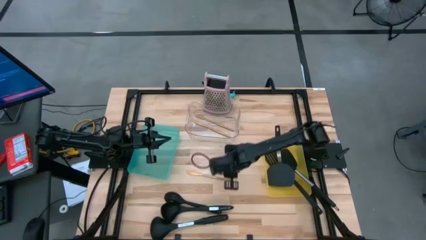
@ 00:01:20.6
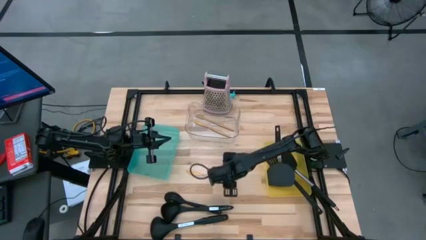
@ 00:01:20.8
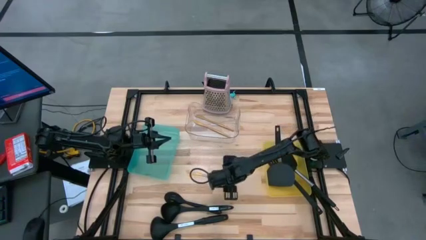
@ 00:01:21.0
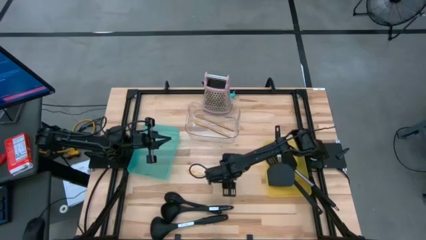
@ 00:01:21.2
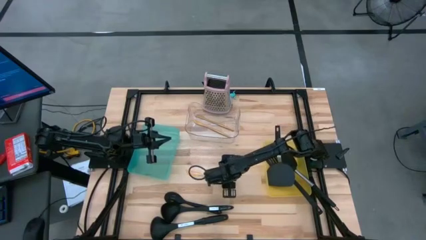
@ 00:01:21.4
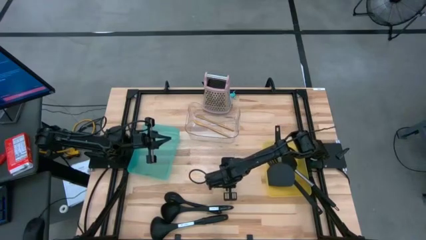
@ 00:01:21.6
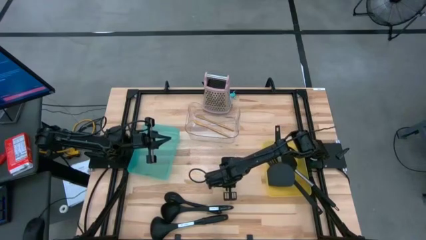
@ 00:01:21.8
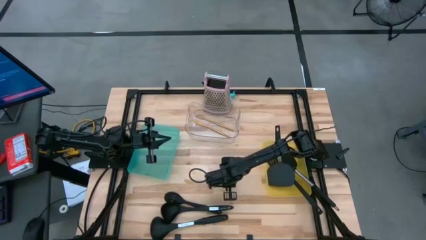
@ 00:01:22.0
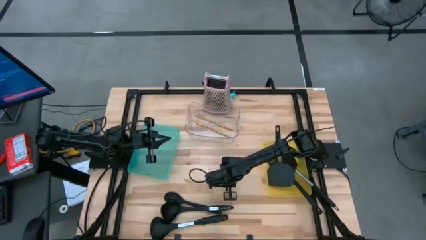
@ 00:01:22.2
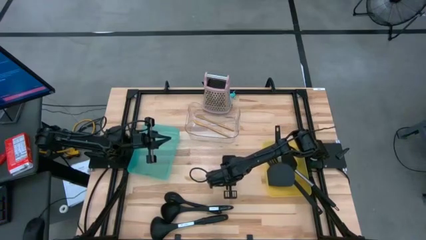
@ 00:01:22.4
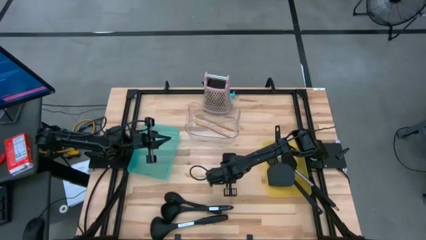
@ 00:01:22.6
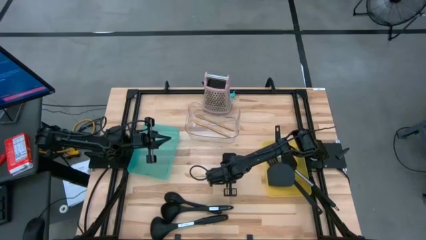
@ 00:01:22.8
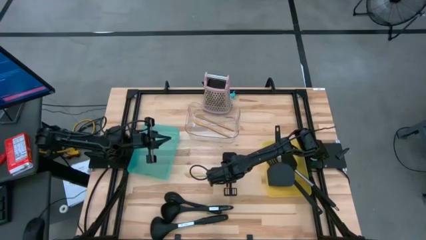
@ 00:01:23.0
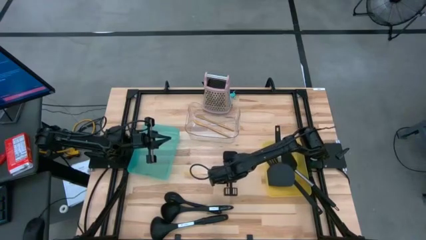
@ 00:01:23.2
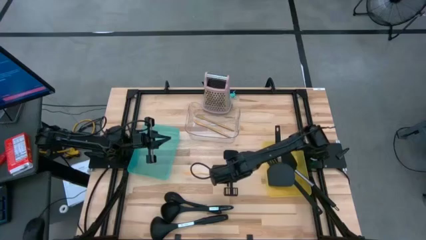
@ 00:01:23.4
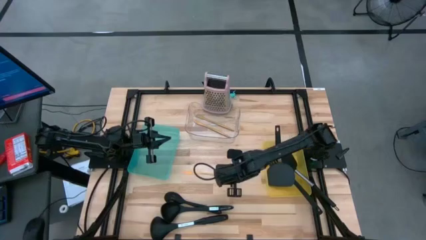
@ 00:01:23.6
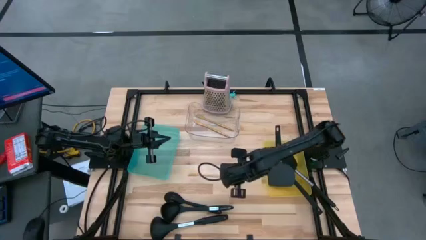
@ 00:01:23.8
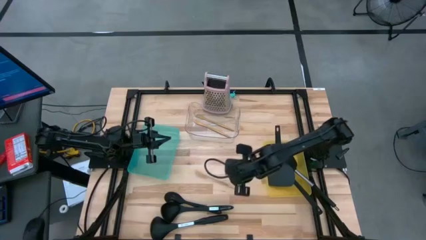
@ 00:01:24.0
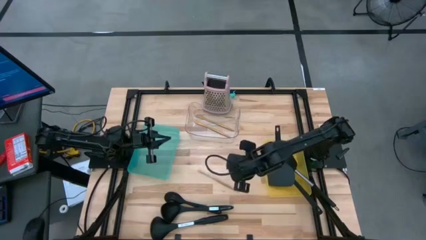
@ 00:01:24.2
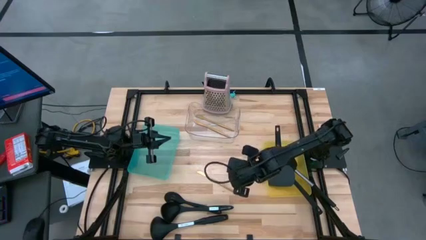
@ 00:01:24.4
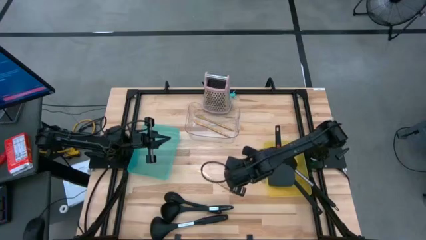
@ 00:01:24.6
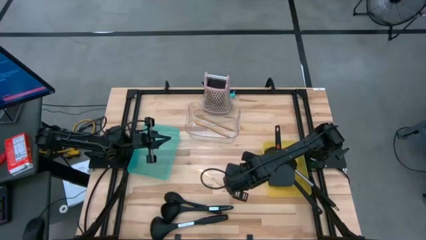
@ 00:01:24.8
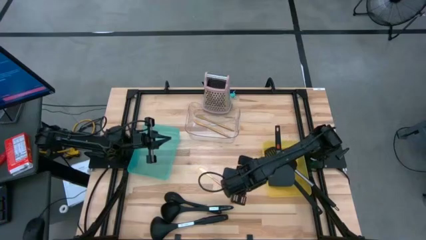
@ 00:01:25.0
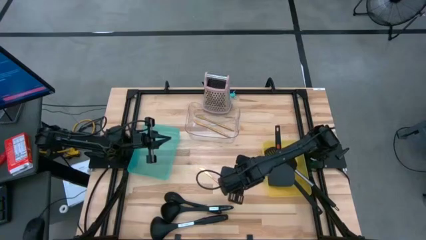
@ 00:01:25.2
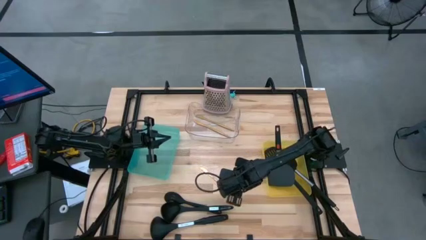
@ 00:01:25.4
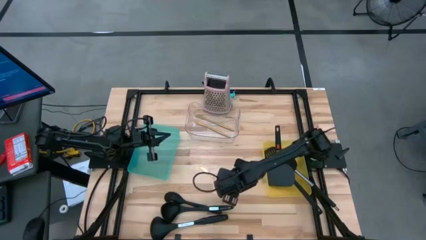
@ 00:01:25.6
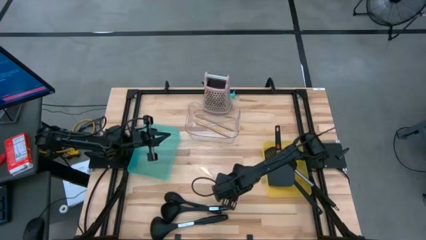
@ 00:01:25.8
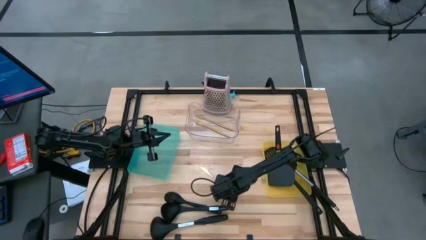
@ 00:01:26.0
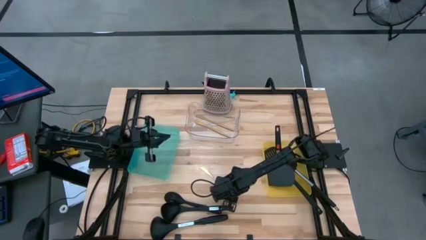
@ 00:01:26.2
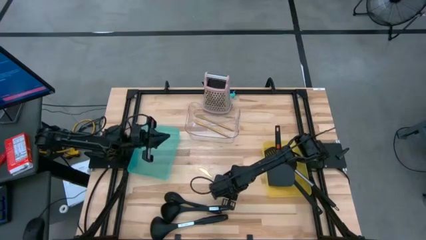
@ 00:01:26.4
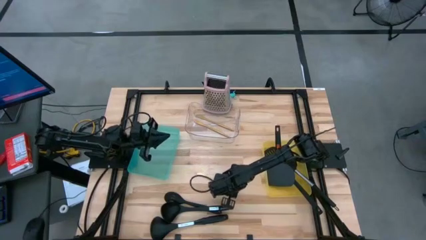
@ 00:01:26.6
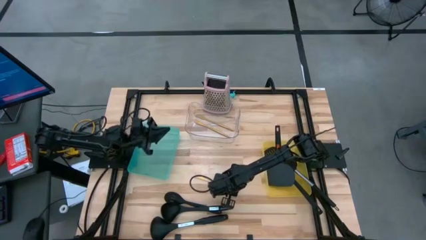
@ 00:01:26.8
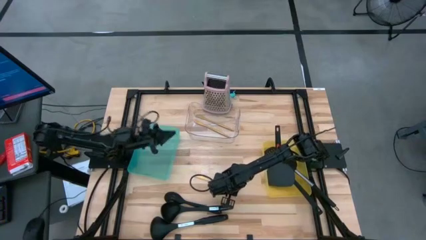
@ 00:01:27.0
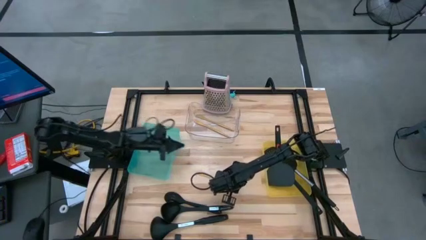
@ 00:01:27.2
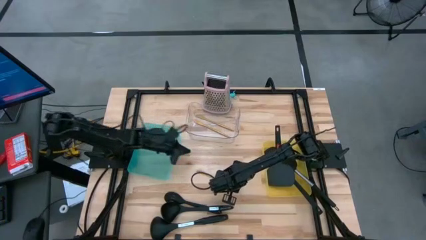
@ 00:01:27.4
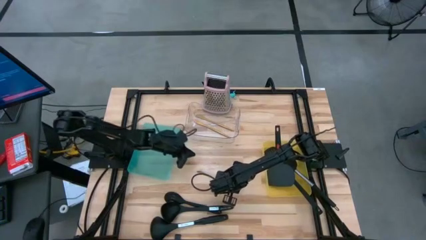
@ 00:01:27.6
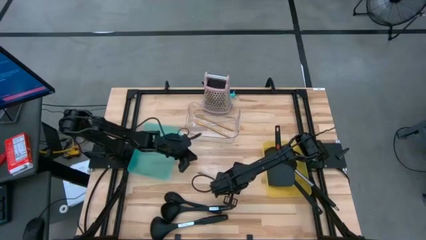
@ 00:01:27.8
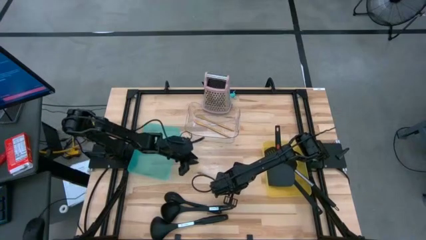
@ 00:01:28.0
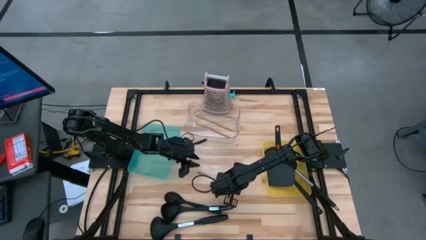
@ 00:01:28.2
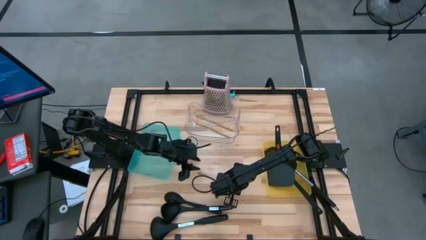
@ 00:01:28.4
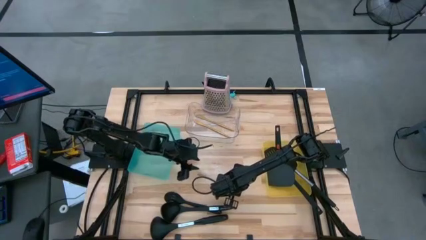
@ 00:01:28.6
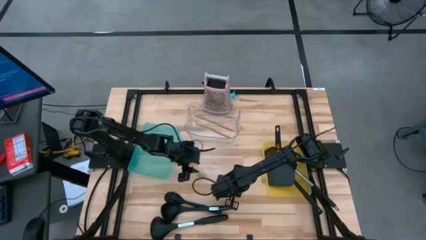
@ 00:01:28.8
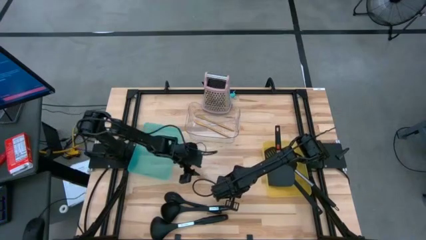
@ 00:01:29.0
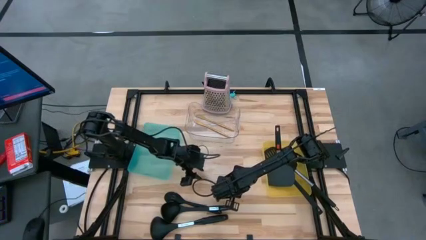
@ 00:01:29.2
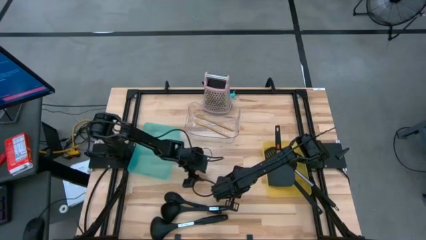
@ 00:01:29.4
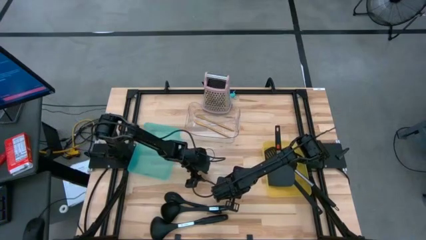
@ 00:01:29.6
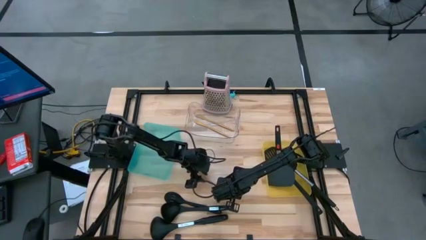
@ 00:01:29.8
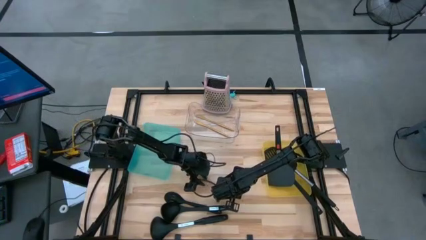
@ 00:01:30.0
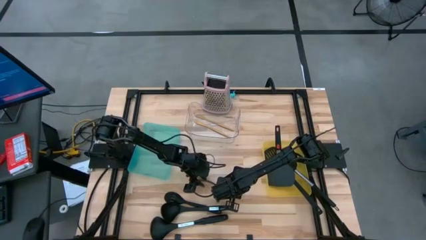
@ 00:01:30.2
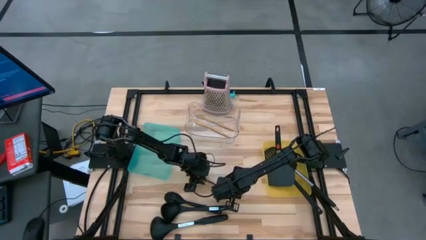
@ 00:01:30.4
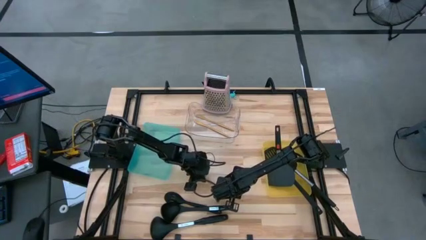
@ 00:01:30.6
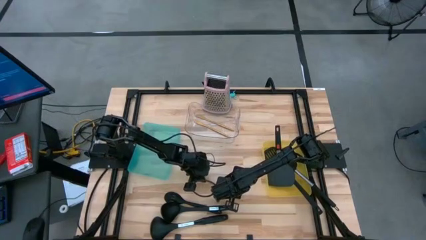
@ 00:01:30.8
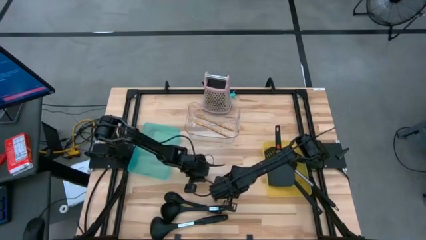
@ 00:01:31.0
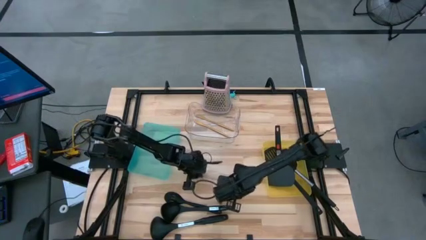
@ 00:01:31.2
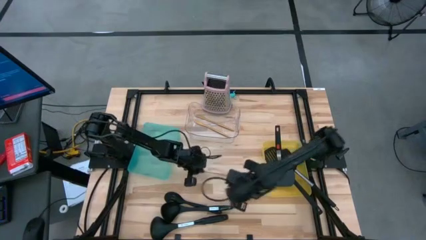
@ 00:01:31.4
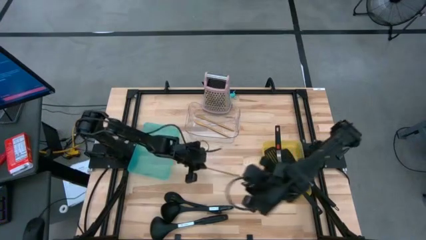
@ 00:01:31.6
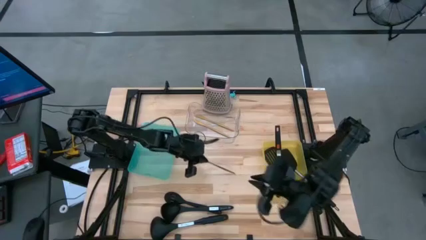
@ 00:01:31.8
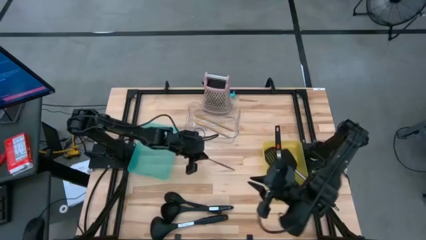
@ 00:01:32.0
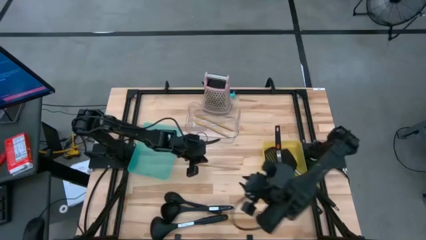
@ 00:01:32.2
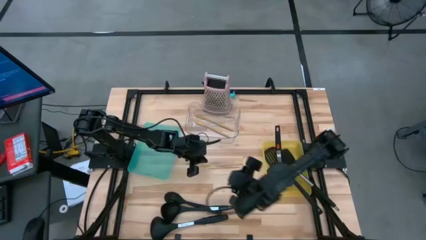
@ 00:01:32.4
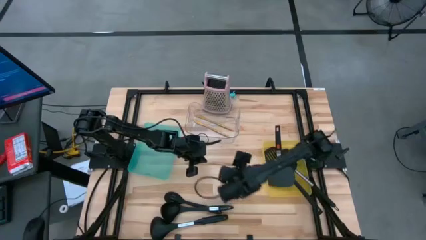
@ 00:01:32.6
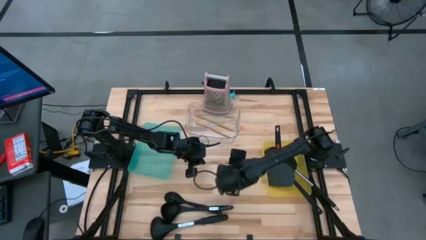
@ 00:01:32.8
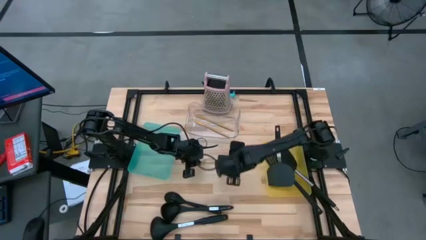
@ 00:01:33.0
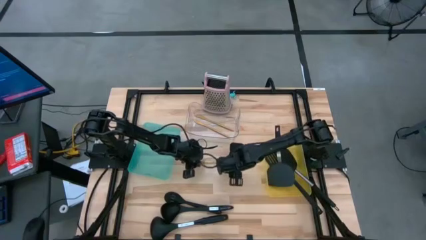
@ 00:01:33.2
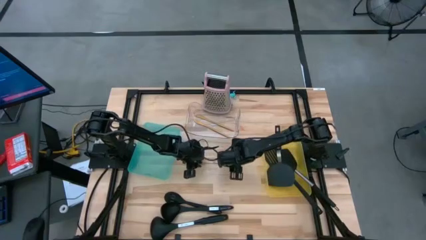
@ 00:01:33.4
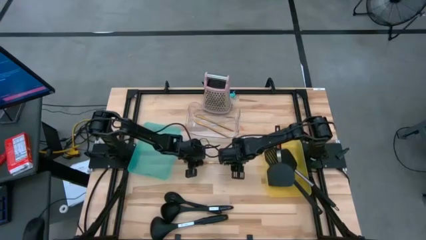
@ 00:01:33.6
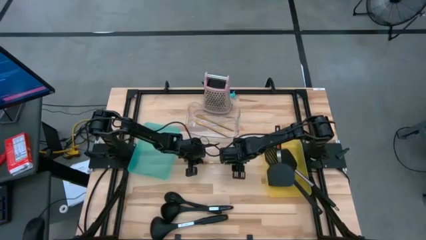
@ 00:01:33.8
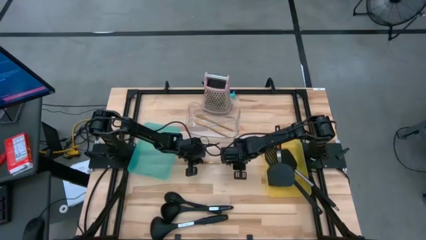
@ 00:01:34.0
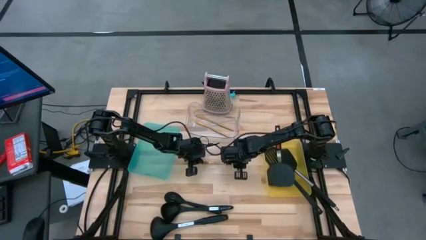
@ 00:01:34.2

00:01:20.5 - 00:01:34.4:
Task: Pick & Place Kitchen Items
Put the gold knife into the transparent bin
